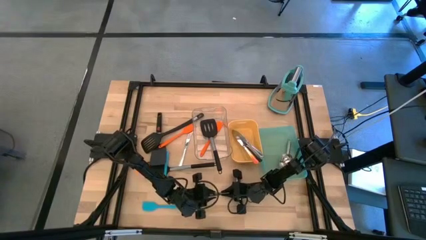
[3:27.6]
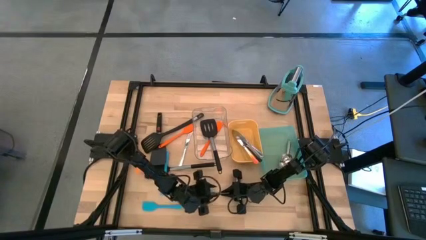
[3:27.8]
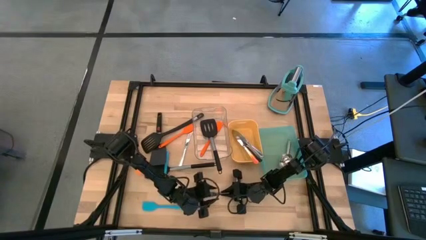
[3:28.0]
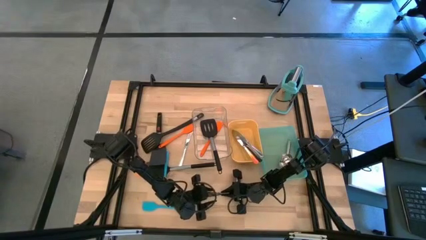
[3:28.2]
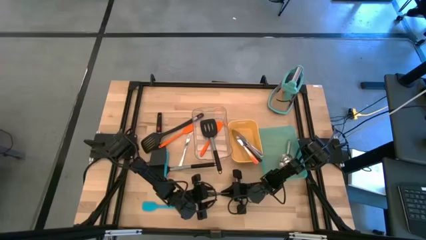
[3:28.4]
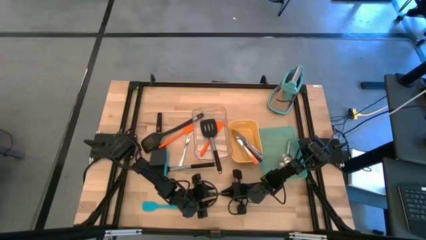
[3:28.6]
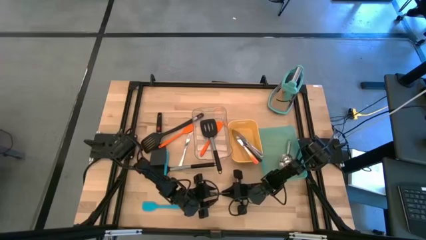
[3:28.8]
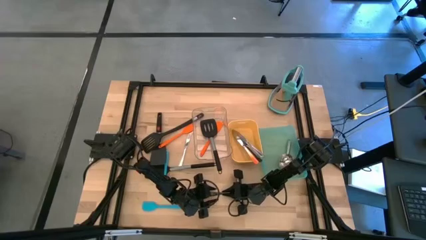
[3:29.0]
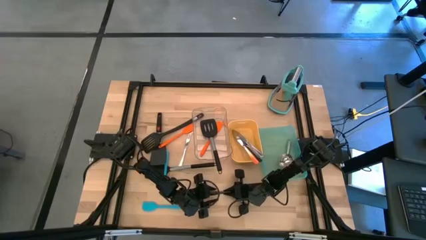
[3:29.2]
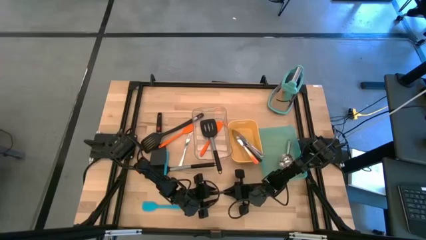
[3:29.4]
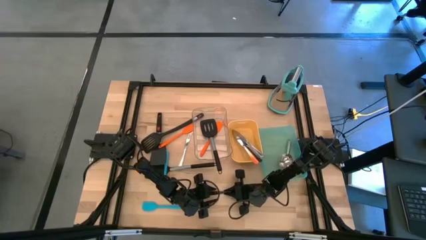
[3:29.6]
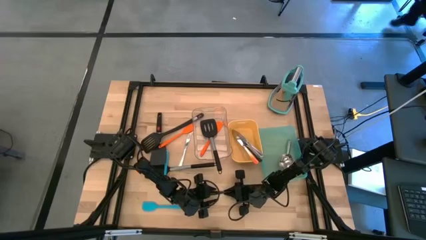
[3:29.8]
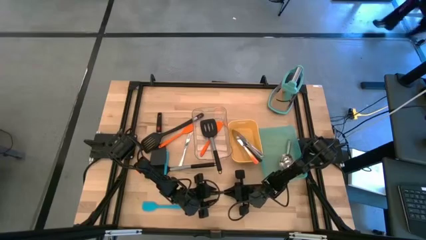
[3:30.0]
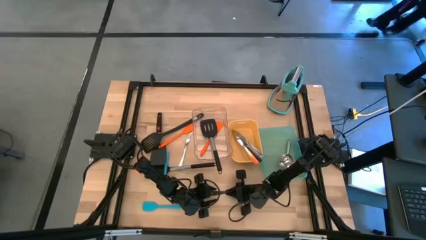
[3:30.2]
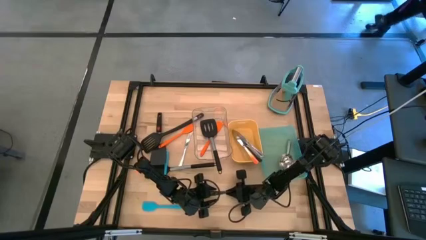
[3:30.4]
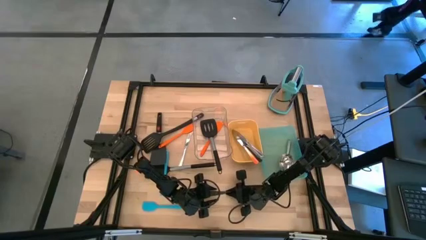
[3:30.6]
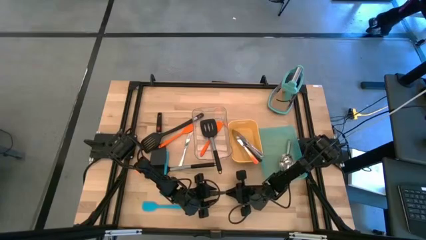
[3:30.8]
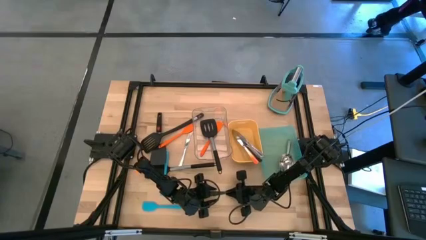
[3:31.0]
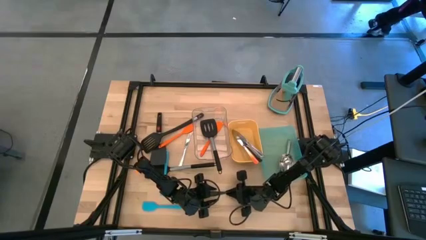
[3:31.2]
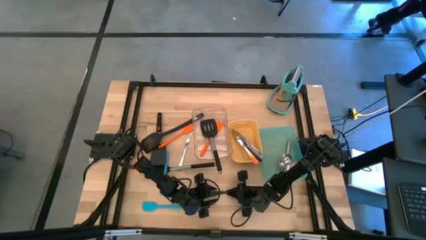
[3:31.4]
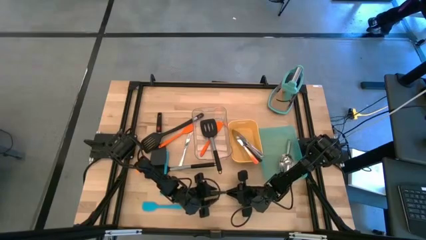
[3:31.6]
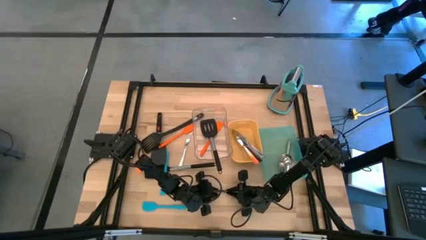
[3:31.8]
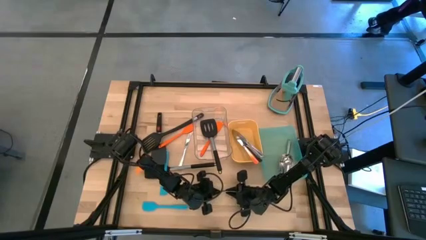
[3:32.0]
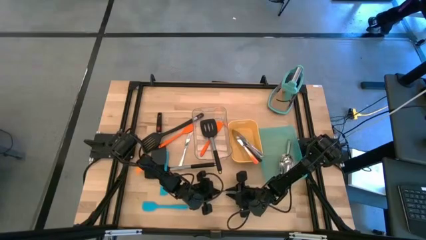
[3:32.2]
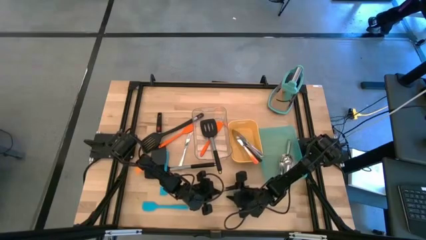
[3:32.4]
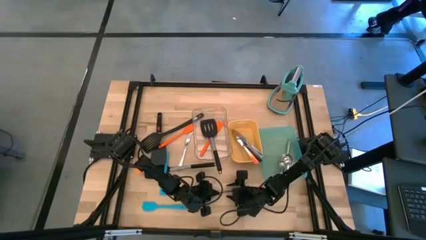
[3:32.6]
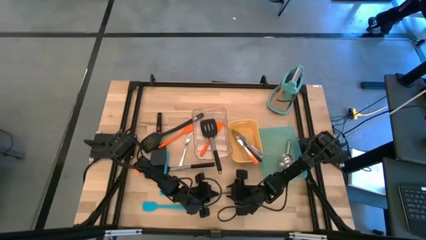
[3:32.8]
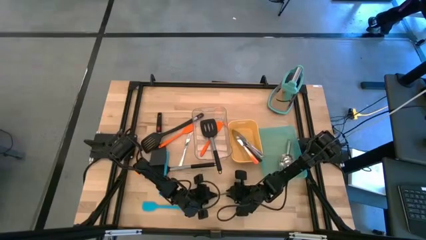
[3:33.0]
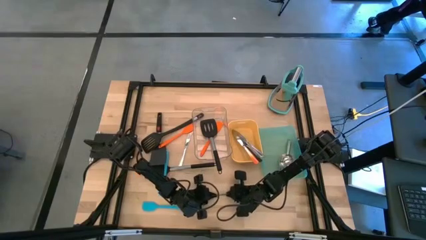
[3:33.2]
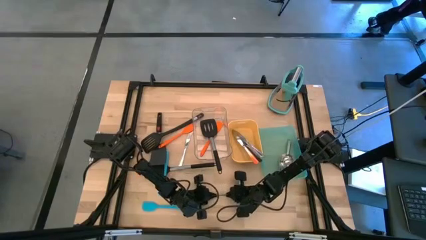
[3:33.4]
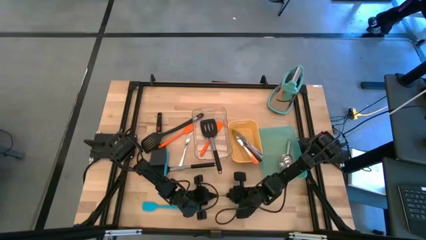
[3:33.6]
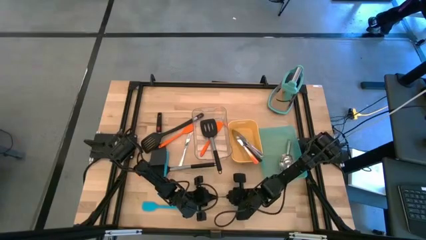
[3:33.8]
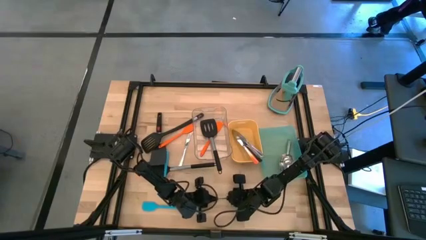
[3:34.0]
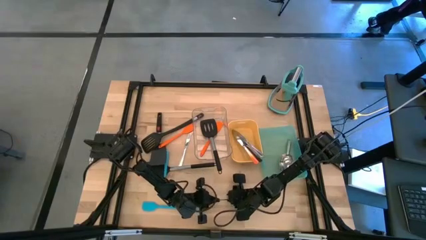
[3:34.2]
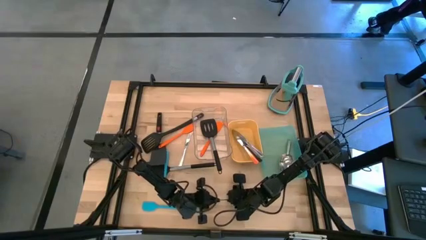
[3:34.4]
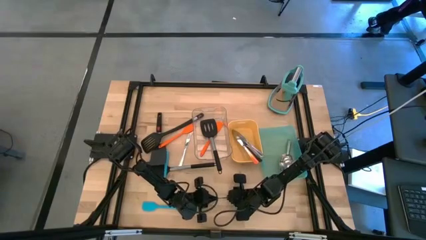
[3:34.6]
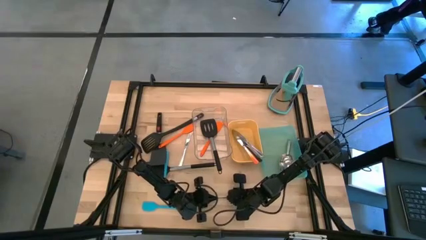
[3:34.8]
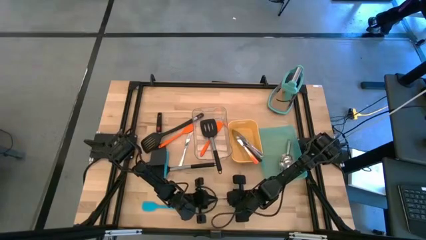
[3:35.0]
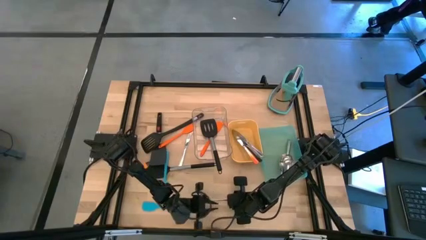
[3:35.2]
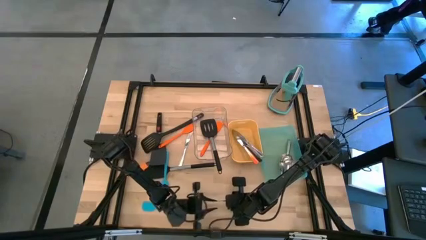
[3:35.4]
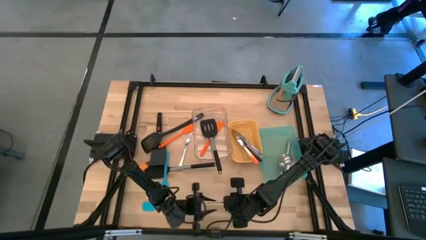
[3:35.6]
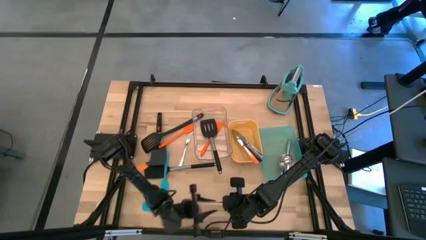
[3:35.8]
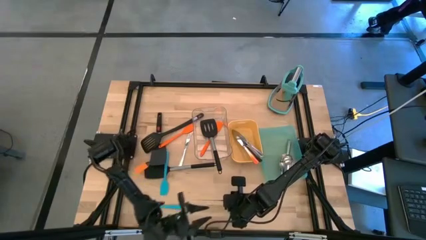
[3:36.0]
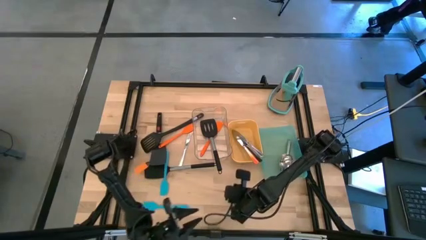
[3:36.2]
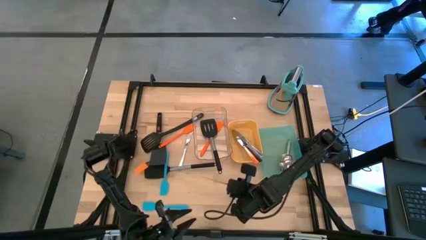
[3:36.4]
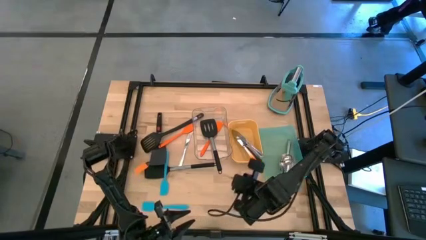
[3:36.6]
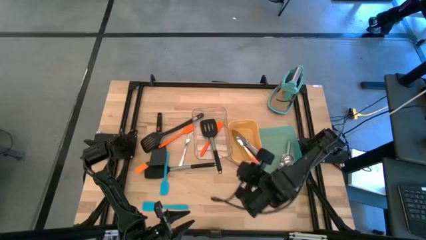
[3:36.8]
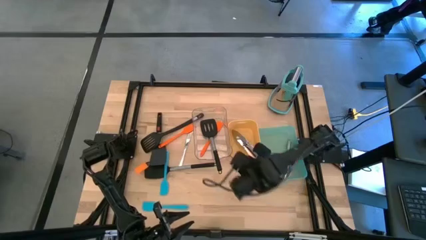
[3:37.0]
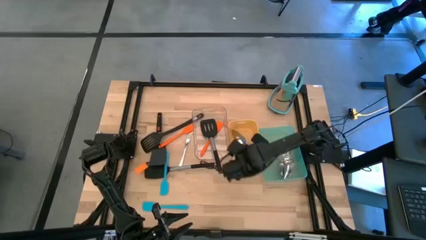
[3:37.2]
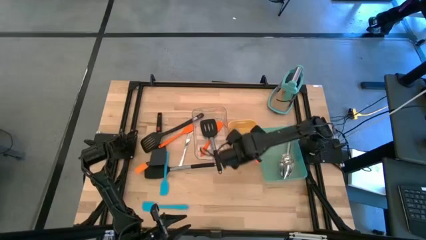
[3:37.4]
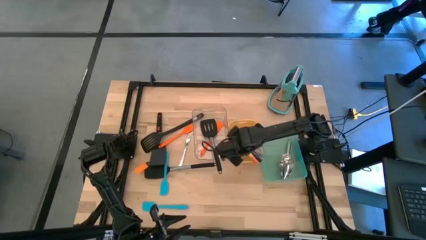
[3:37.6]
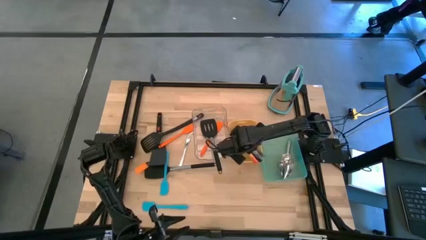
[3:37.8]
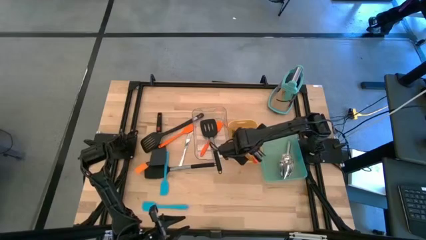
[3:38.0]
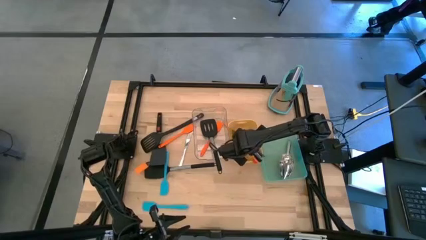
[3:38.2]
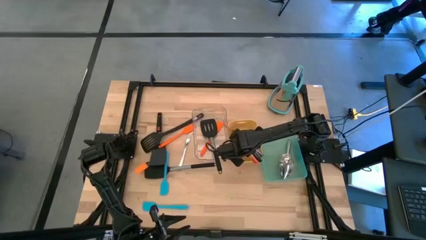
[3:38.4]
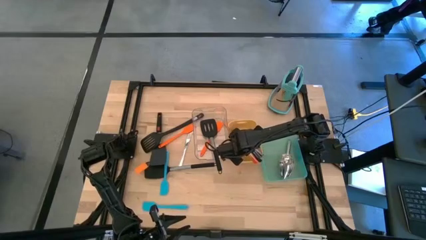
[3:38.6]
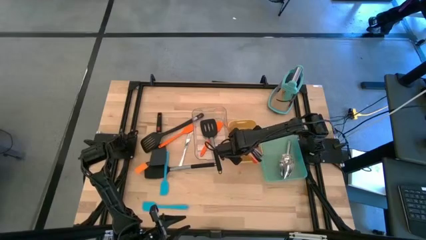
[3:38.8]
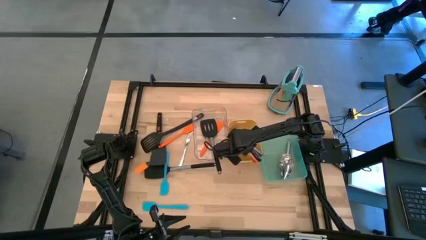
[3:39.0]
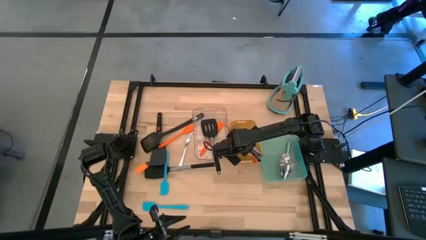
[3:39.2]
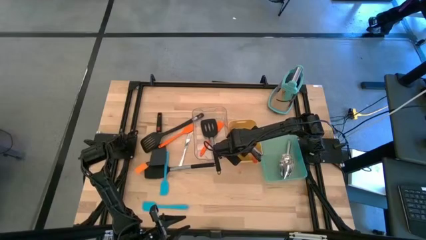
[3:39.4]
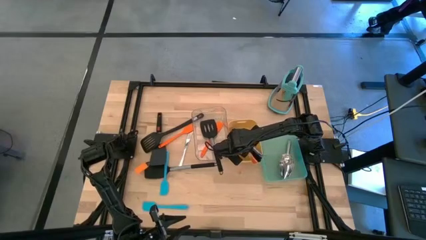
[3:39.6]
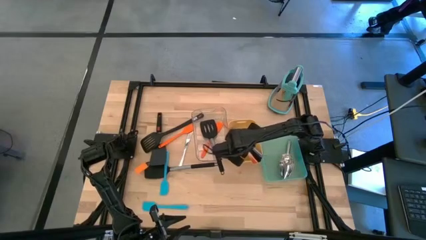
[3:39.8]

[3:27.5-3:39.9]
Task: Pick & Place Kitchen Items
Put the black table knife into the yellow bin
